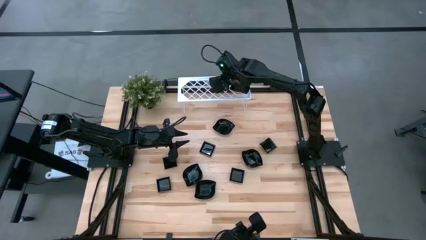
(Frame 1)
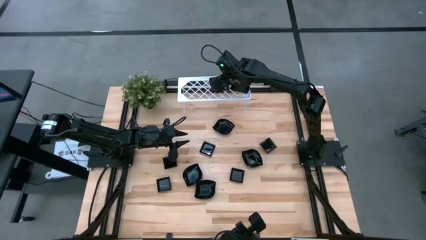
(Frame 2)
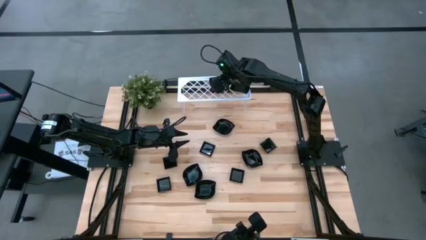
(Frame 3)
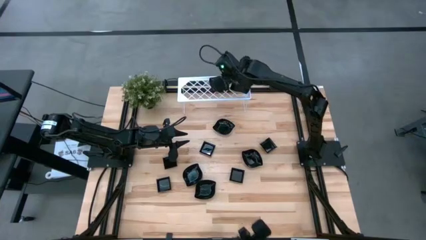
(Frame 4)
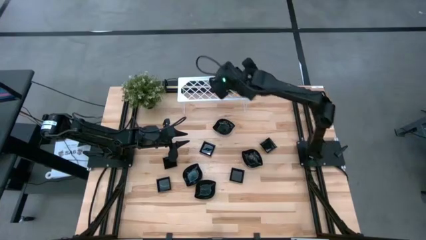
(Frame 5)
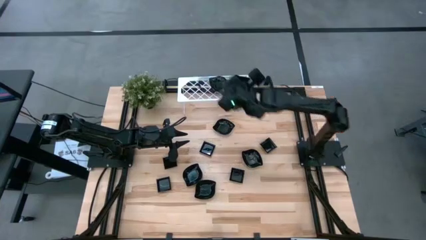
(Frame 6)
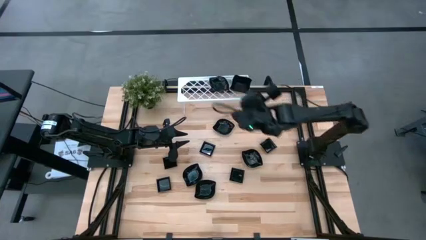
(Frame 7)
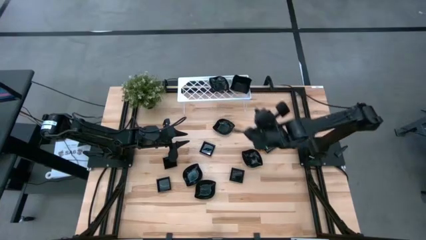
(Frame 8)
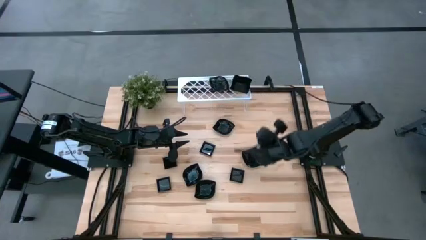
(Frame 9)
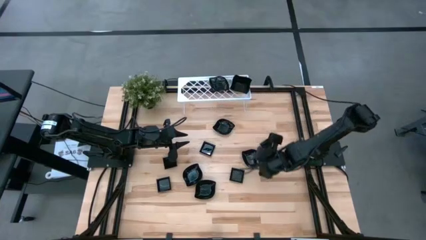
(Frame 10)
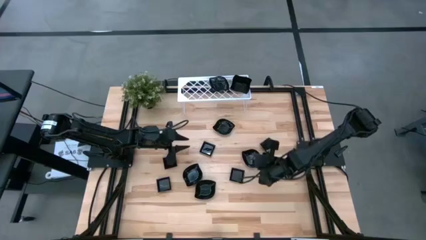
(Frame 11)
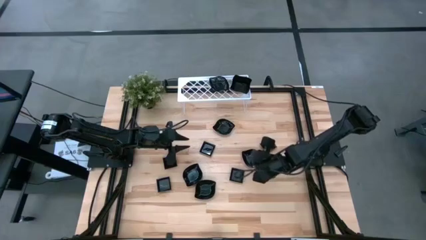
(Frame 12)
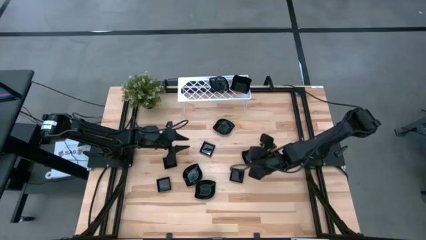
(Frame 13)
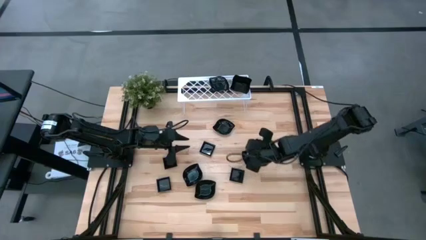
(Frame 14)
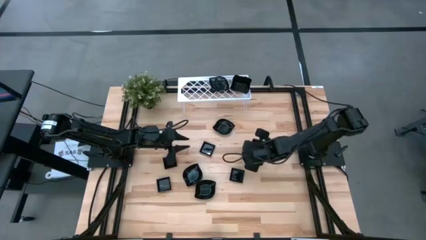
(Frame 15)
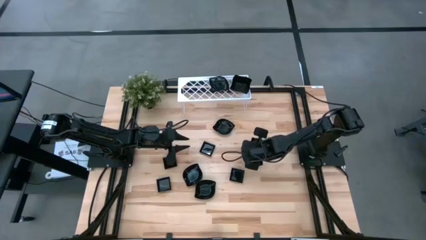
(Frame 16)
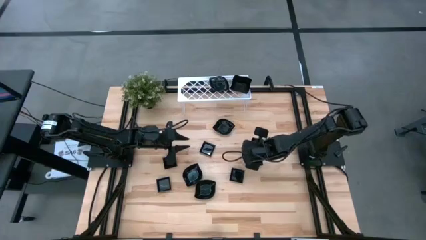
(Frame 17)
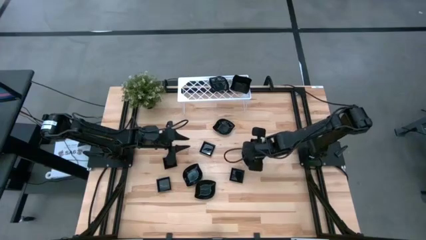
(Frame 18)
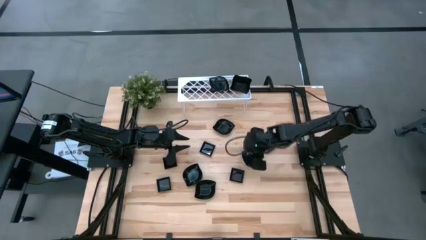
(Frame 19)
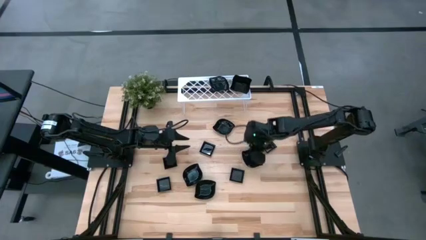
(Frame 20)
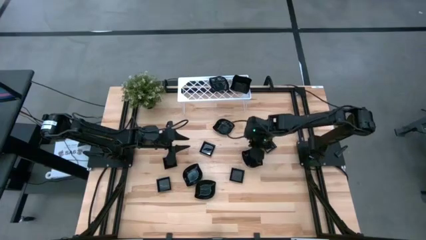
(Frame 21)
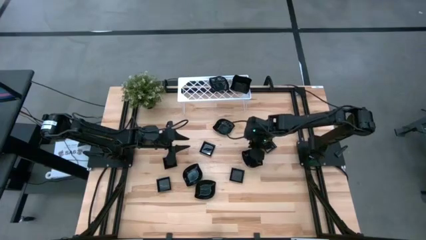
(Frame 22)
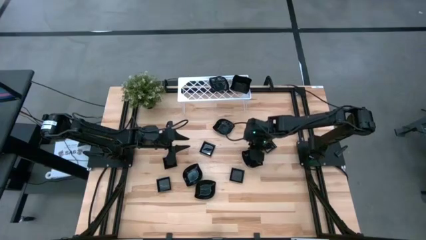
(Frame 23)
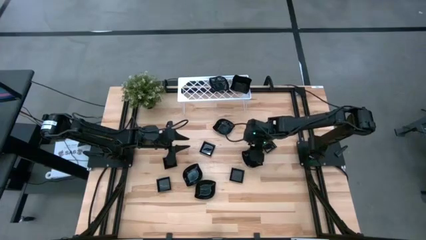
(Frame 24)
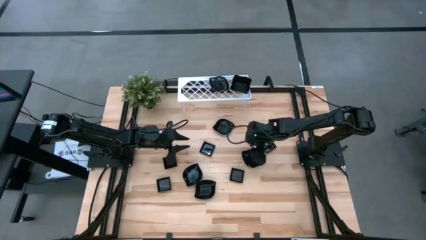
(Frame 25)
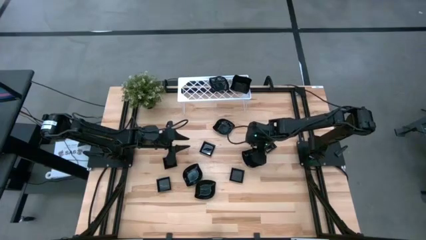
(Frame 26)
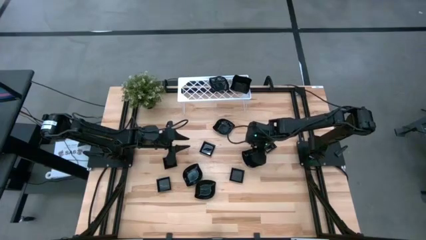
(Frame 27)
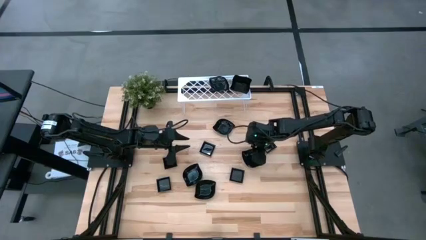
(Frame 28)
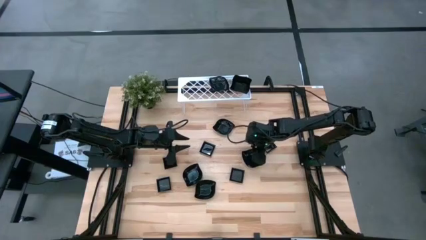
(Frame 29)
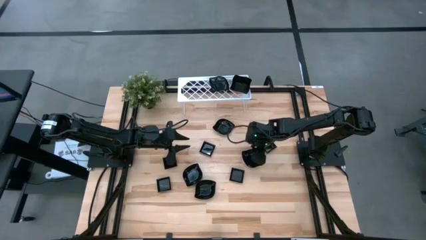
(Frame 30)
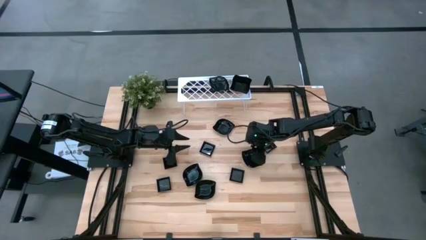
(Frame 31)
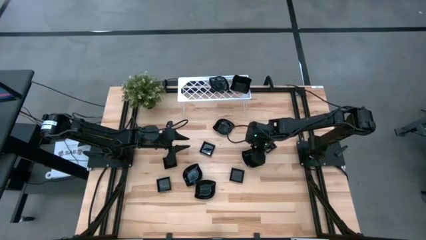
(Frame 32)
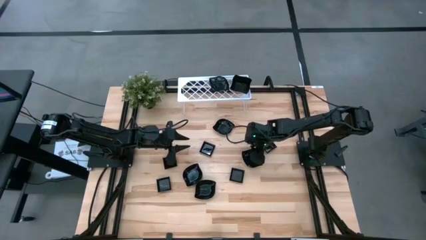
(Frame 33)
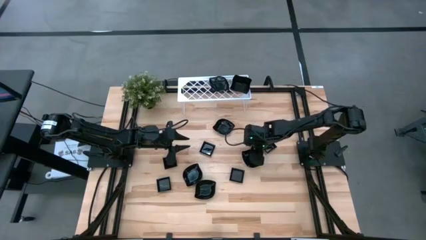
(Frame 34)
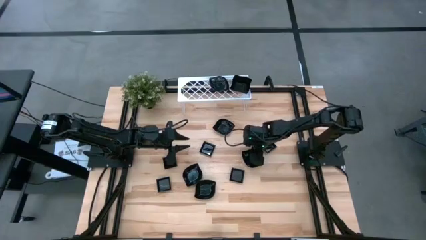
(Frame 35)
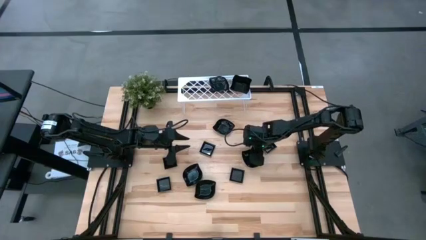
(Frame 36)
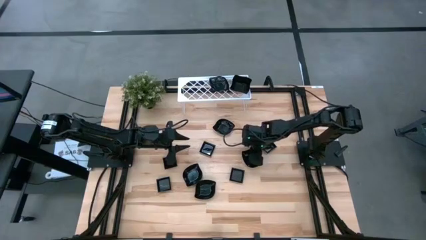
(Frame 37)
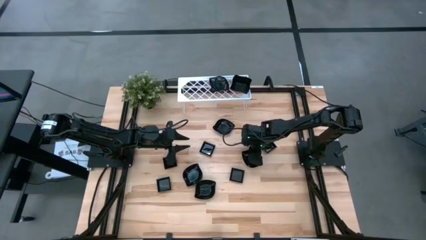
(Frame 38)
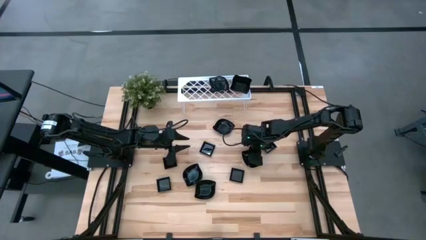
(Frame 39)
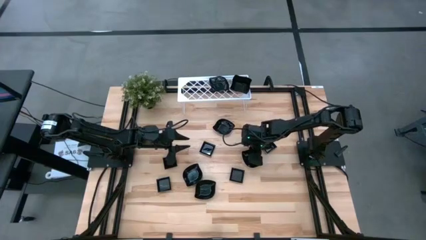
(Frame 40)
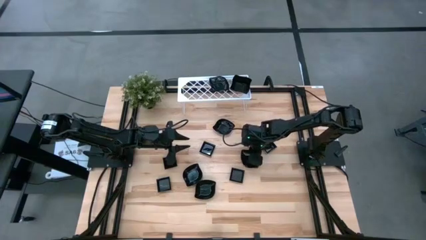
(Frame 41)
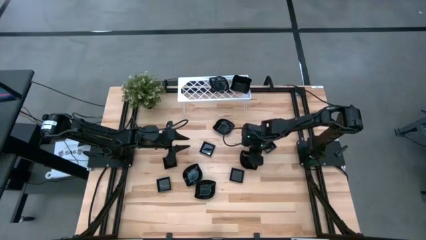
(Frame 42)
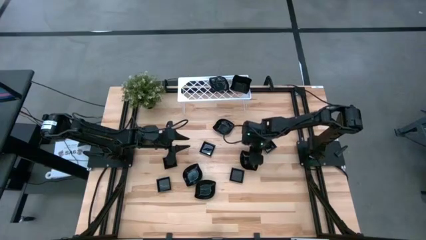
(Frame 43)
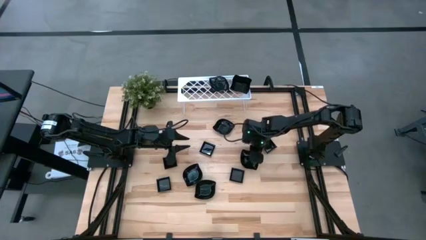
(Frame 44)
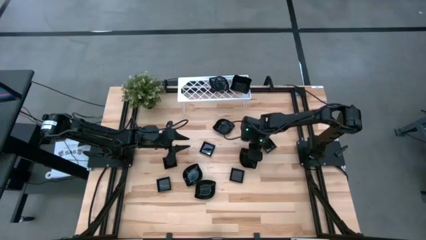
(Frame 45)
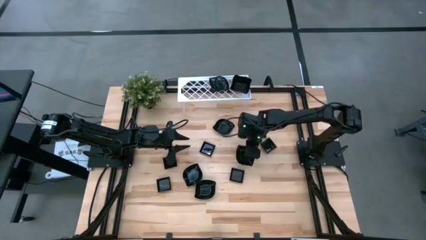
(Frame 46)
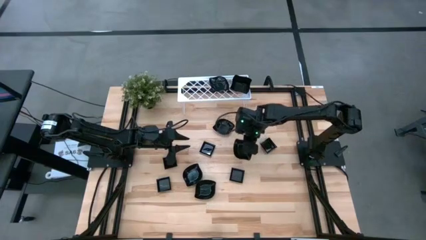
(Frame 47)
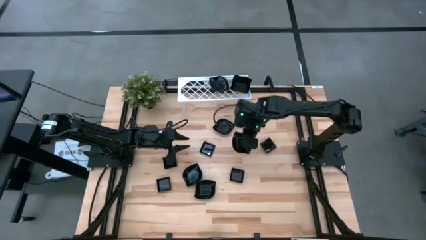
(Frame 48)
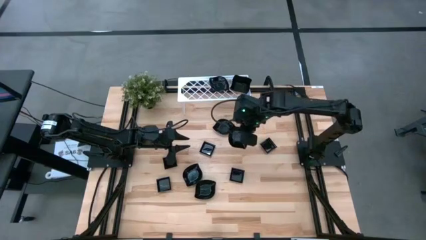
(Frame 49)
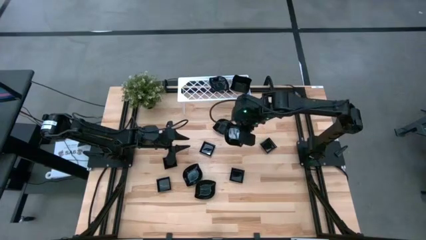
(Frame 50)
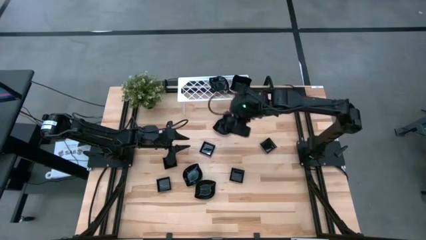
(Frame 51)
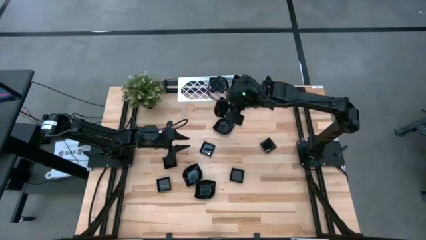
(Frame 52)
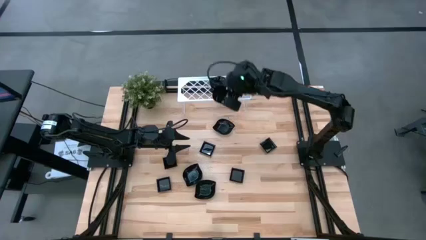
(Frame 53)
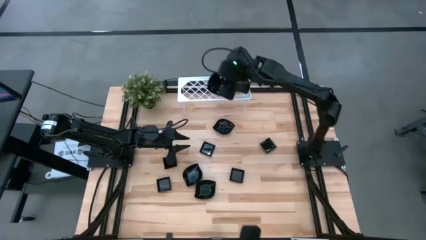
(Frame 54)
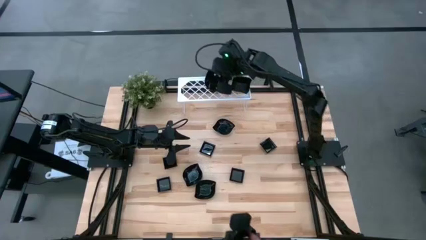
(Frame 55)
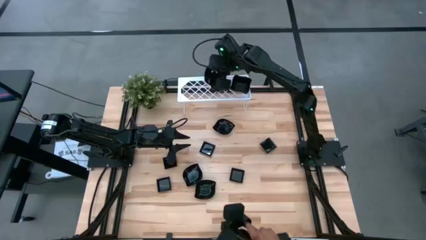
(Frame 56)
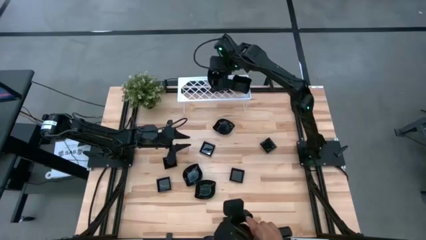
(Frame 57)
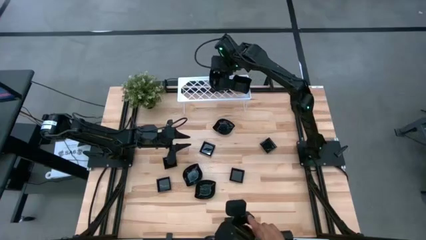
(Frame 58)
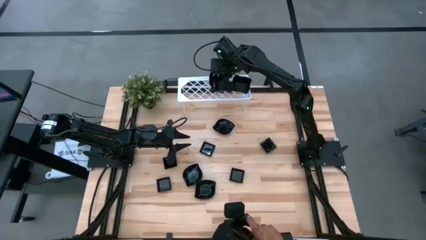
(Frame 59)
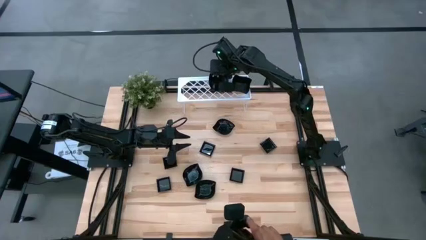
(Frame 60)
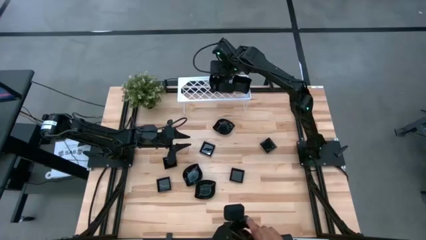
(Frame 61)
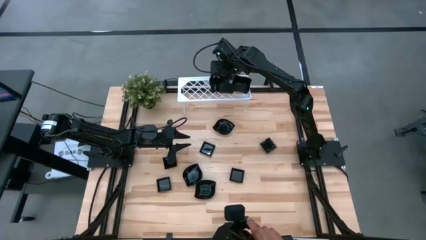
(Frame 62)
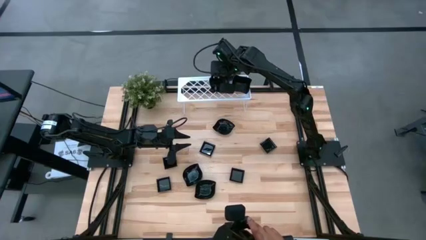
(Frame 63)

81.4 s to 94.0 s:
Task: Pick & Place Mini shaped plates
Stack the black leaf-shaped plate on top of the black leaf-shaped plate on the shelf
